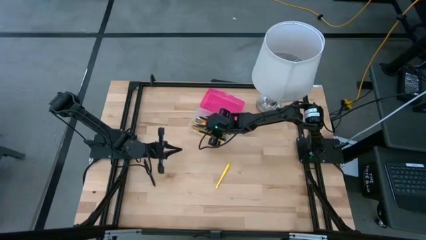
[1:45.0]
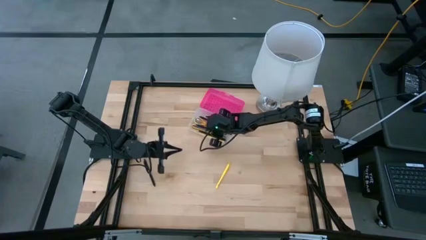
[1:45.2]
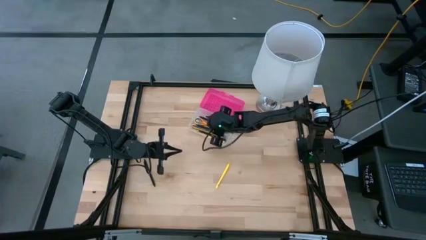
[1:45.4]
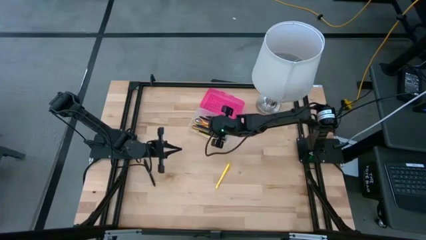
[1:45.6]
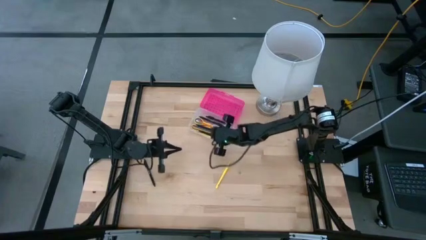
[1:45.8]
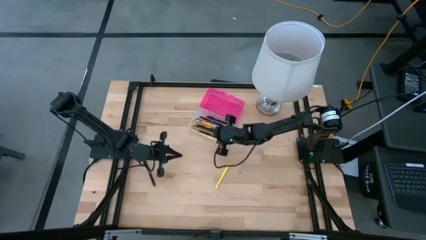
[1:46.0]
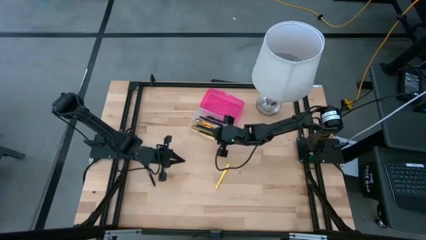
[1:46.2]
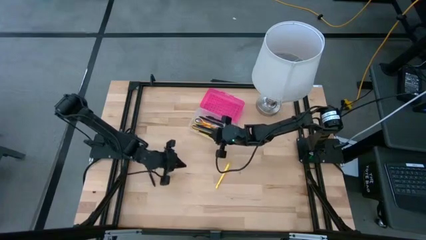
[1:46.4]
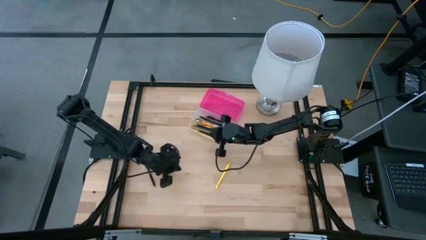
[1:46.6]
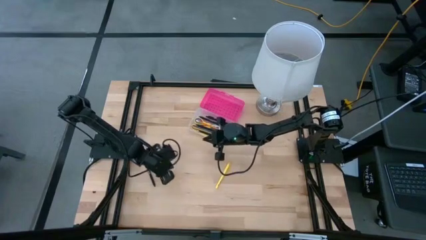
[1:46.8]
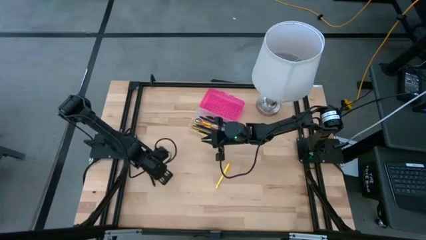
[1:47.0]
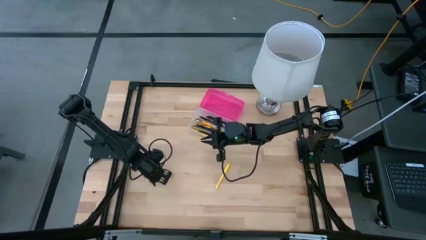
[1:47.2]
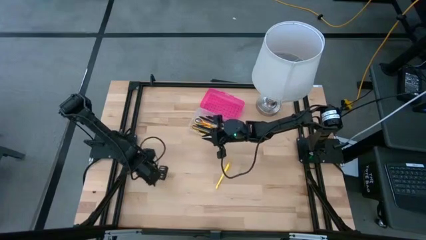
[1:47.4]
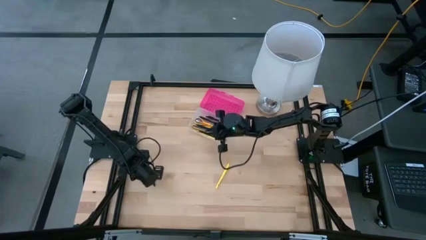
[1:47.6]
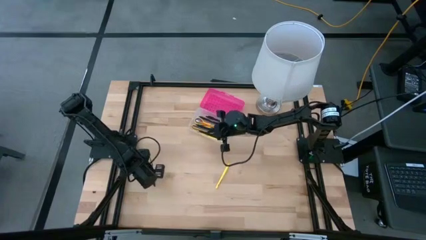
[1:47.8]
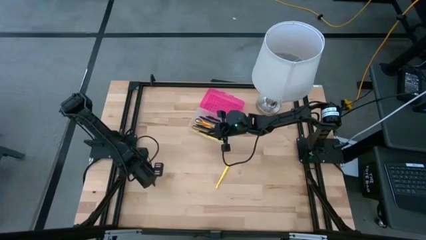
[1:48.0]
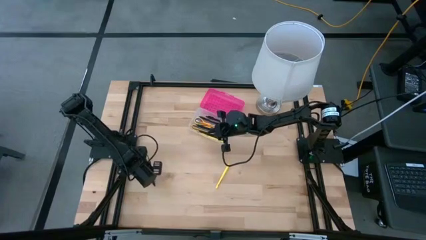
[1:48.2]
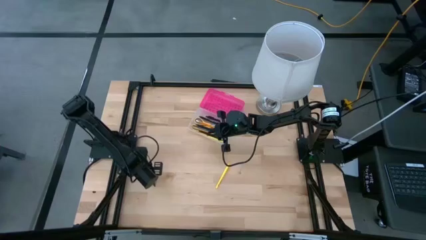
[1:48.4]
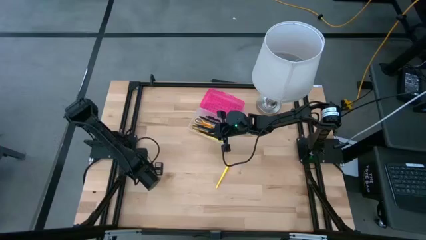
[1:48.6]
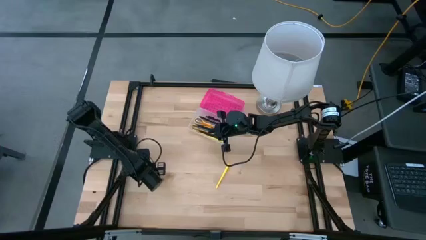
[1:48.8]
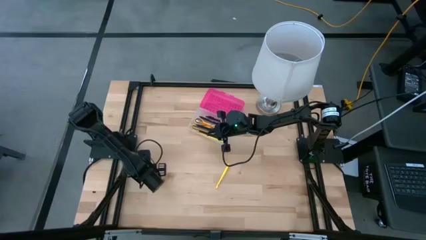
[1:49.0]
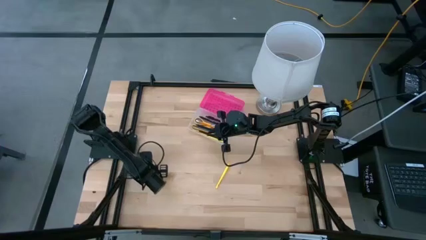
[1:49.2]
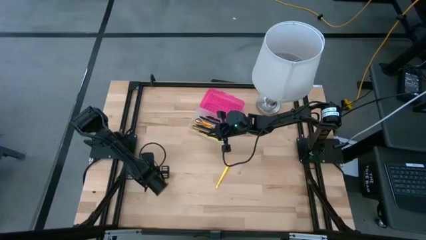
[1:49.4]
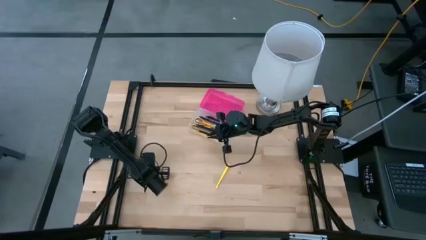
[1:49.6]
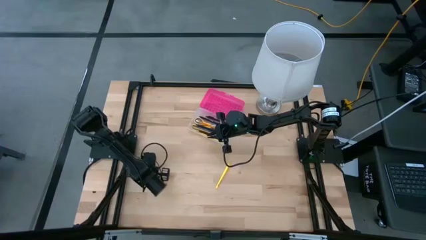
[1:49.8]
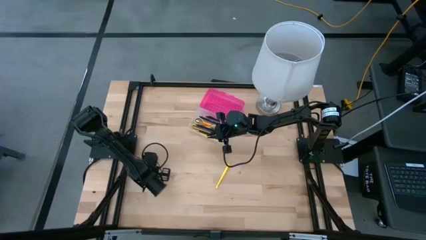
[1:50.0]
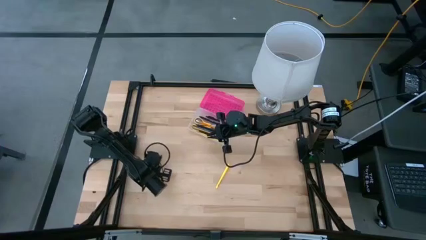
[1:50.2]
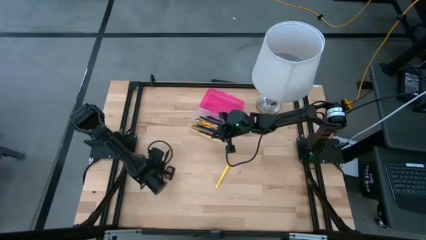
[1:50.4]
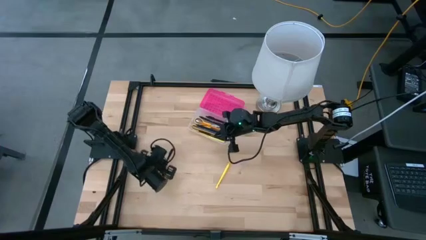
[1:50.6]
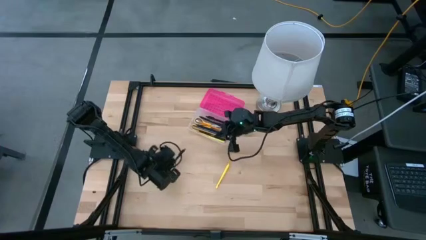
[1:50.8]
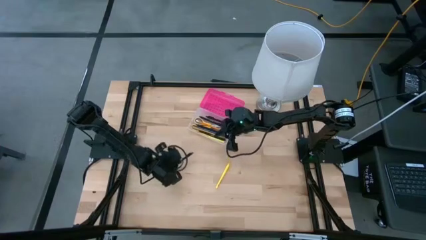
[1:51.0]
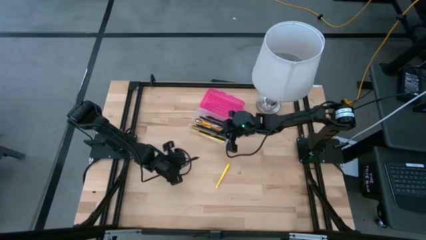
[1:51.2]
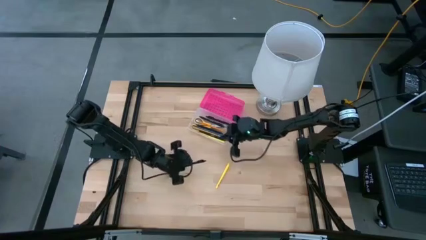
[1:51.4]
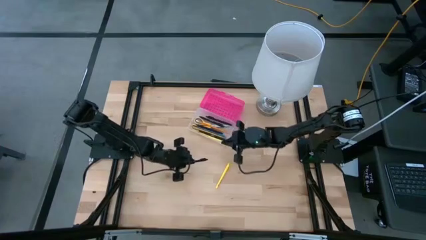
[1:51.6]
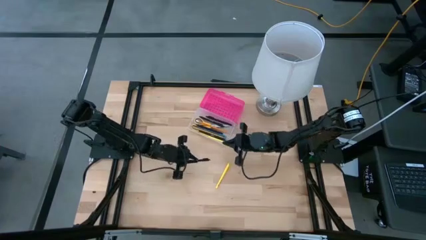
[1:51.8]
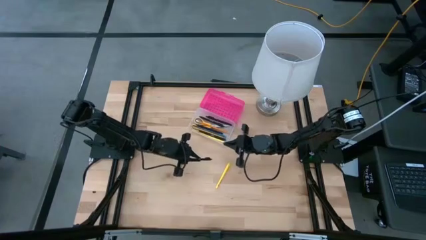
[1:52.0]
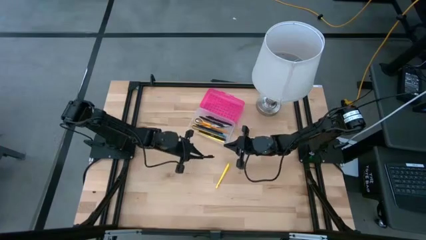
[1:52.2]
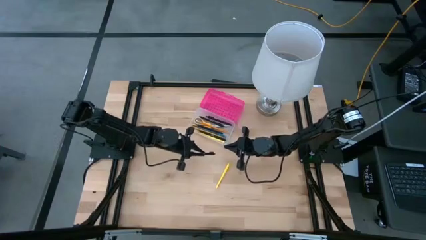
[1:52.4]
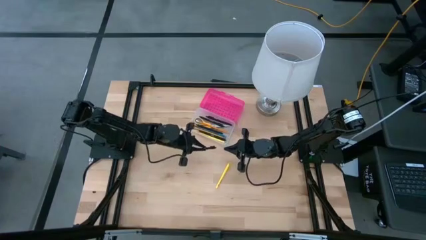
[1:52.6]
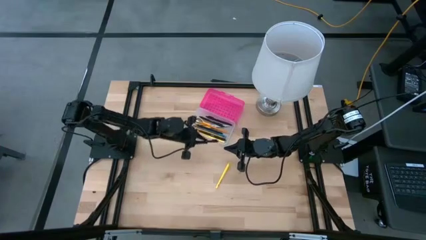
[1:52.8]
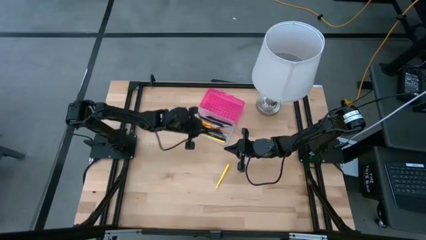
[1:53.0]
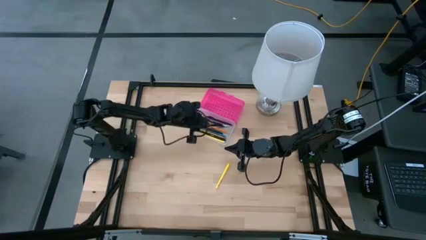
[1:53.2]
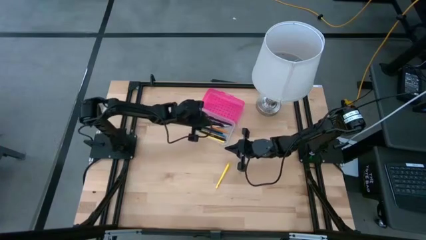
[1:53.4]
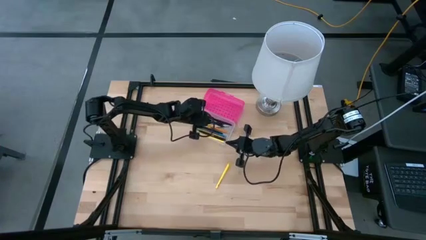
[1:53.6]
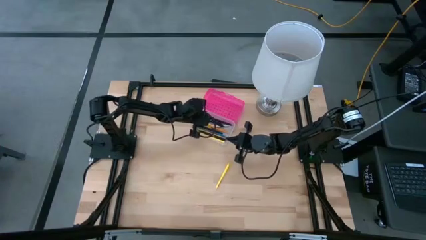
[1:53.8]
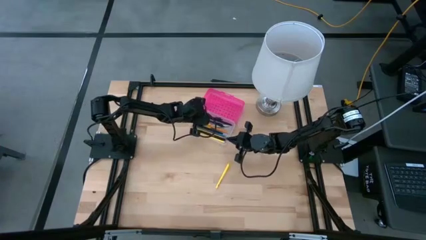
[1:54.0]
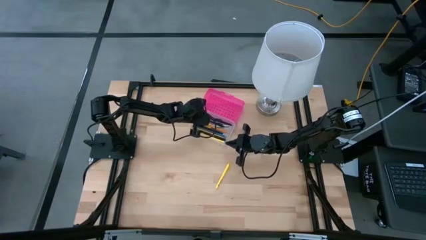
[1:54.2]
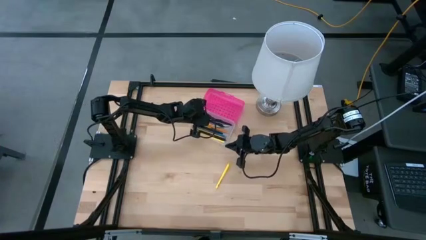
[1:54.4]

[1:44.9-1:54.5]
Task: Pick & place school supplies into a supply box
Put the black pen into the pink supply box

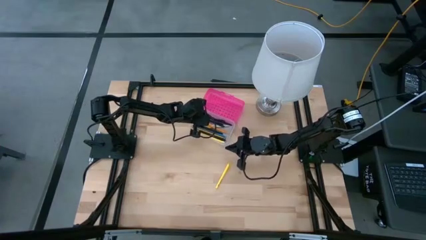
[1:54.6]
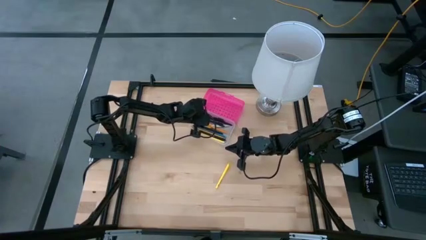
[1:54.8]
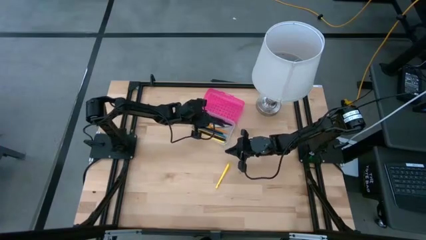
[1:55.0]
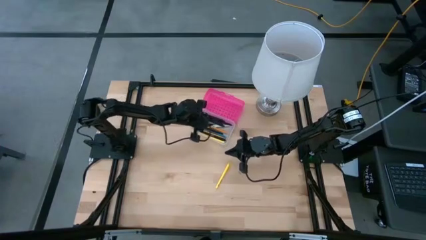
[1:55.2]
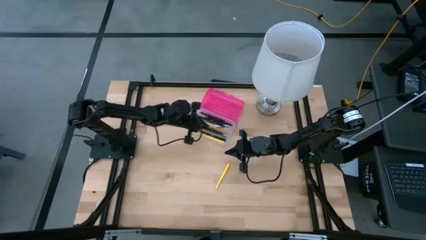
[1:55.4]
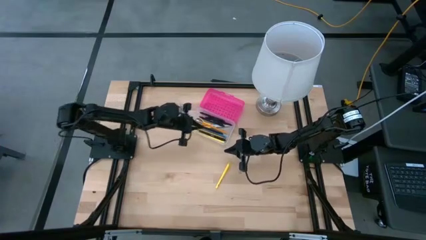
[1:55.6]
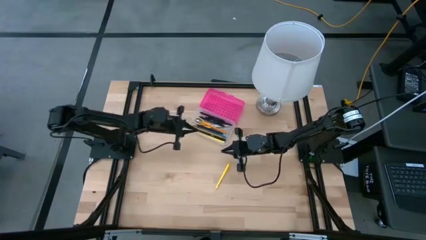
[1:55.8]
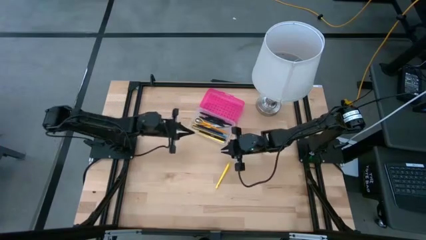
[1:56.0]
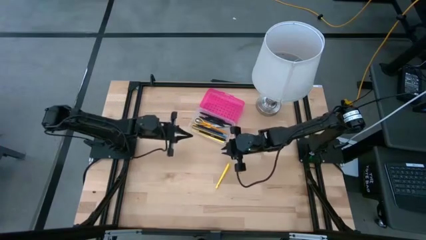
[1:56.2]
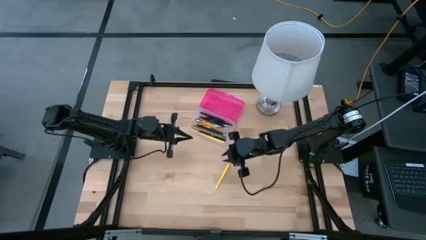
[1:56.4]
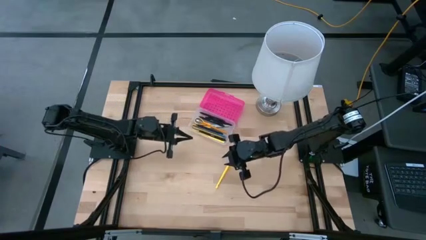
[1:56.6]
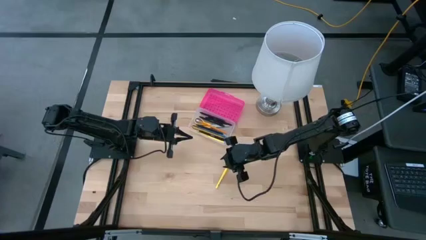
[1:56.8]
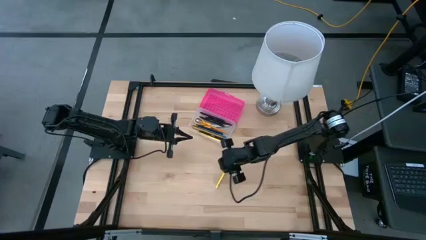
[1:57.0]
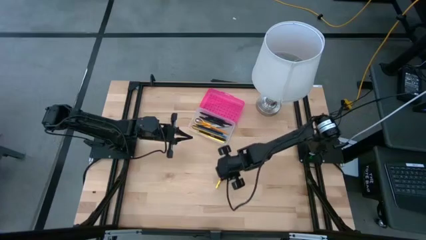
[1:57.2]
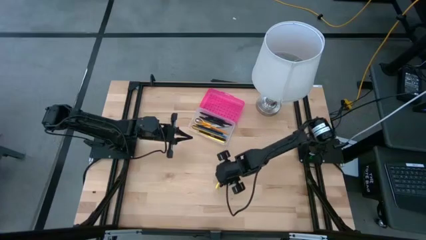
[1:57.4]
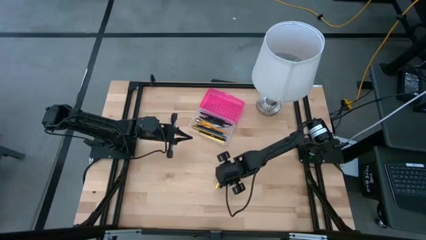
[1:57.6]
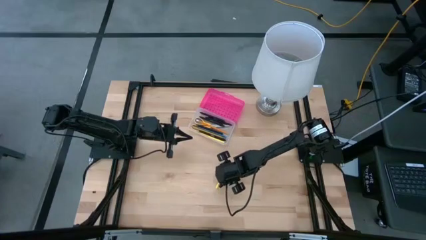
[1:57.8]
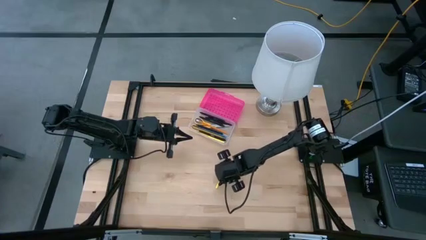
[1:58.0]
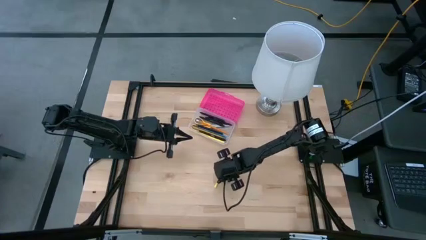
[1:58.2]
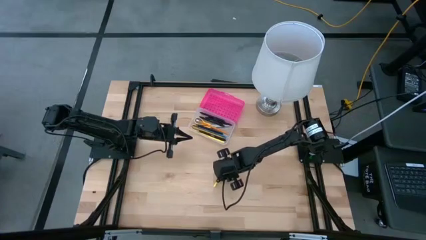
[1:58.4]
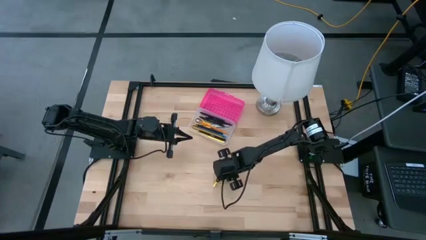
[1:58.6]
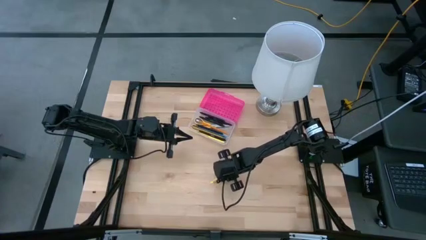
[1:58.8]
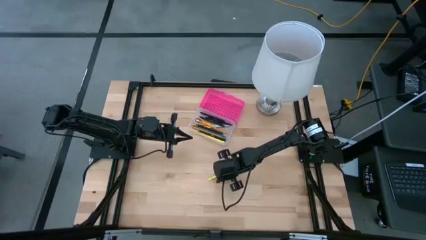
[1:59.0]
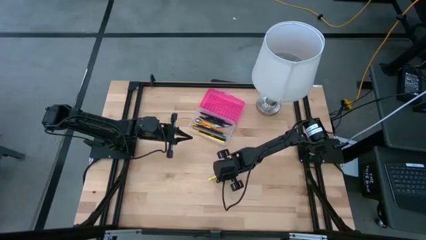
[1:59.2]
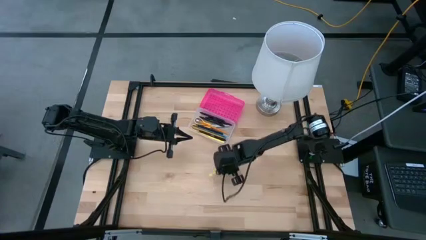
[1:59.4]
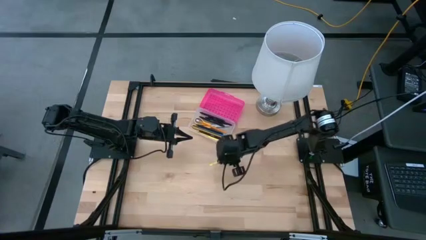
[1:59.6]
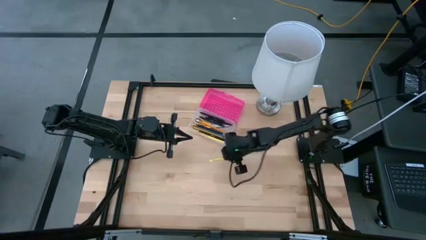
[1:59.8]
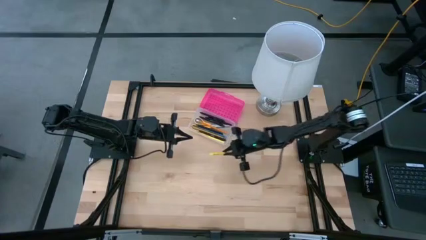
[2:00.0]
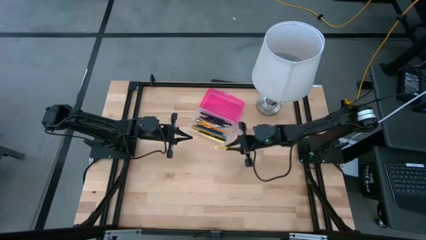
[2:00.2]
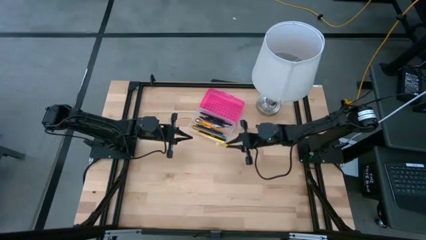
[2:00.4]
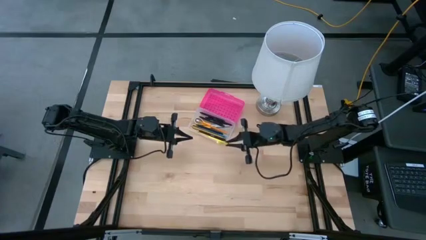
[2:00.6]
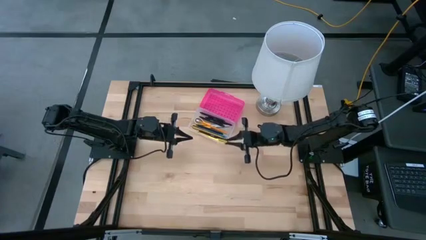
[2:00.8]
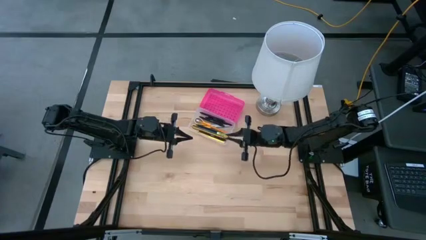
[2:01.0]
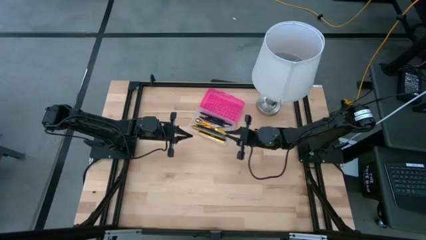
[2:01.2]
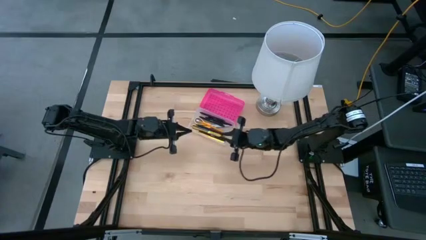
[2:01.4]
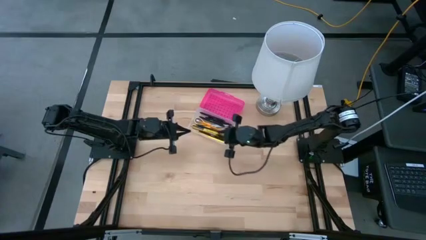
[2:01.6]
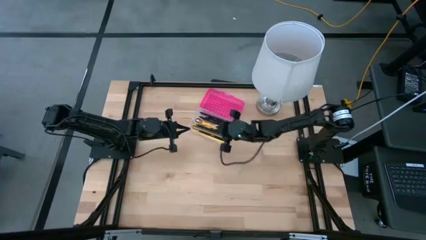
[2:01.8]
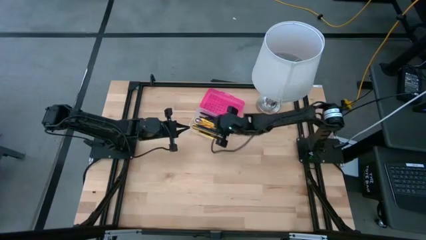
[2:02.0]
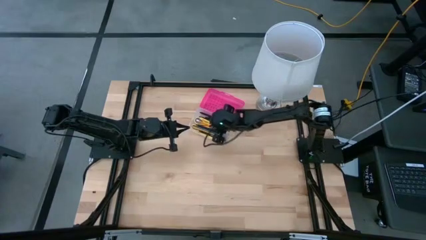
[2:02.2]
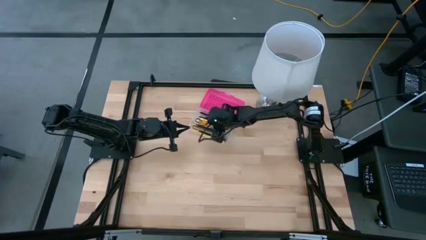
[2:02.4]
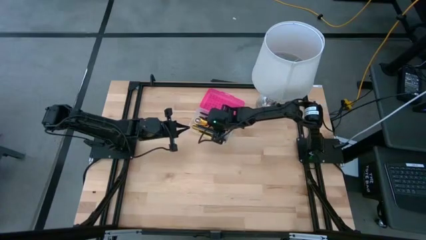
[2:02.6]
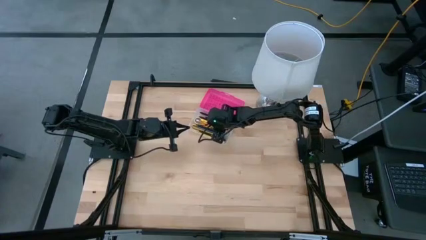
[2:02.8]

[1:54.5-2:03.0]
Put the yellow pen into the pink supply box
